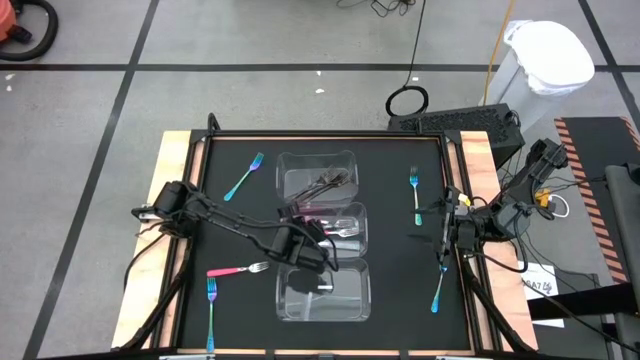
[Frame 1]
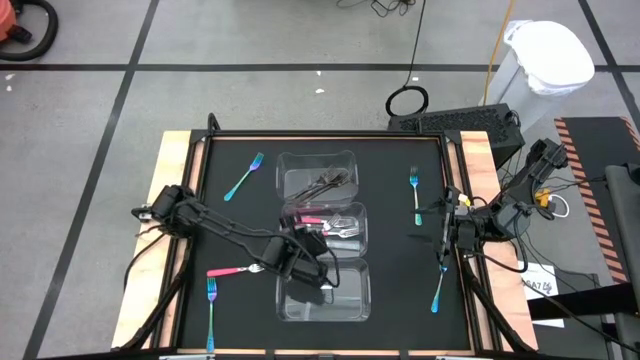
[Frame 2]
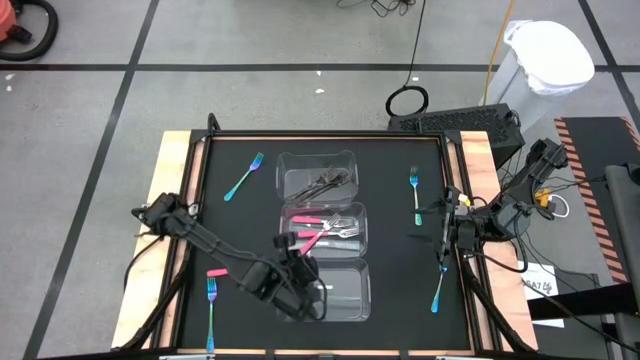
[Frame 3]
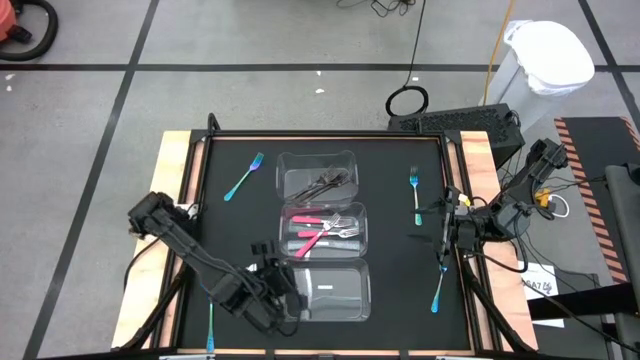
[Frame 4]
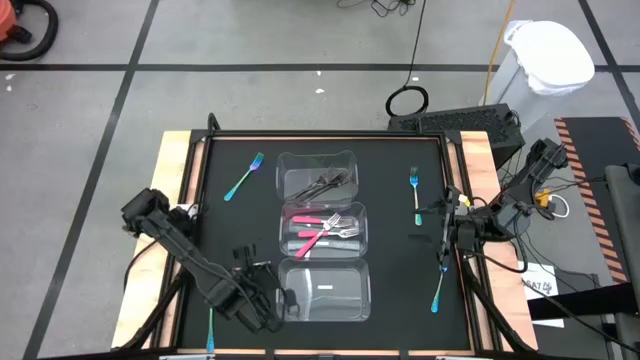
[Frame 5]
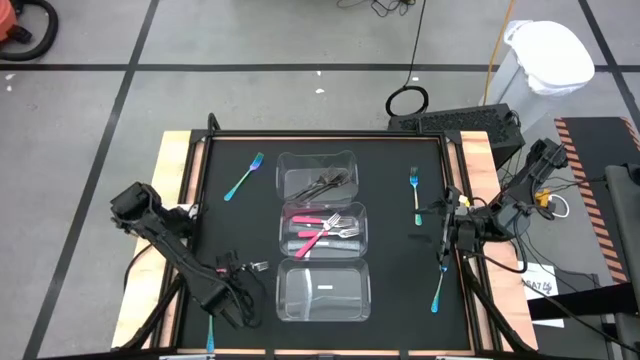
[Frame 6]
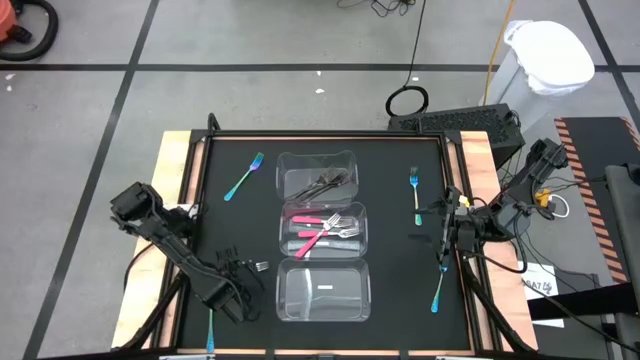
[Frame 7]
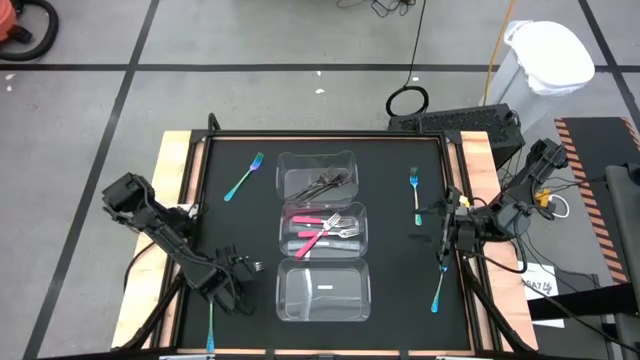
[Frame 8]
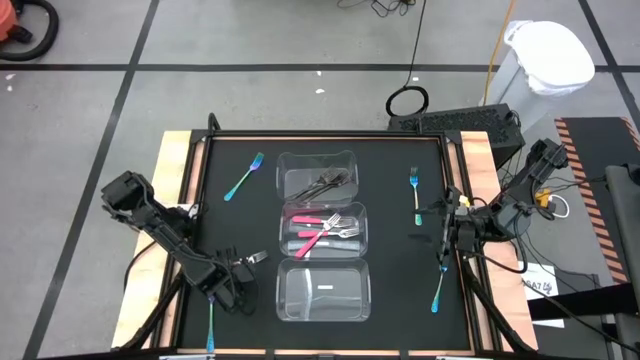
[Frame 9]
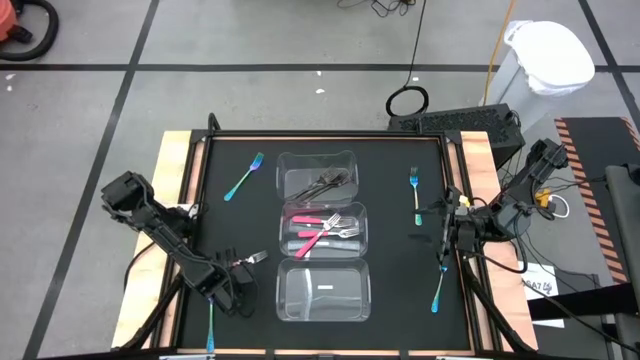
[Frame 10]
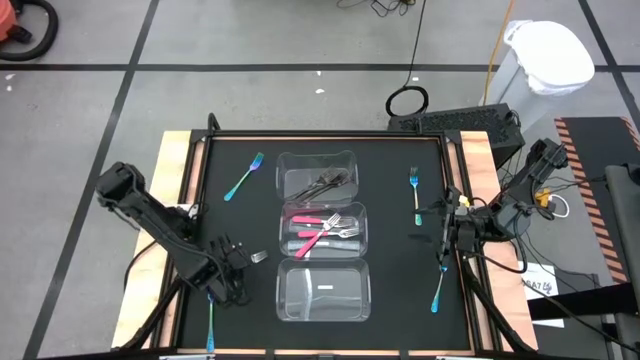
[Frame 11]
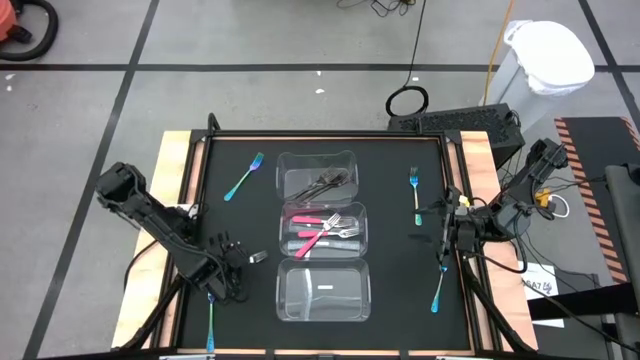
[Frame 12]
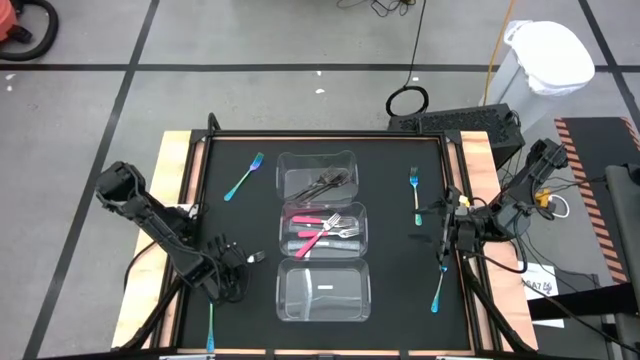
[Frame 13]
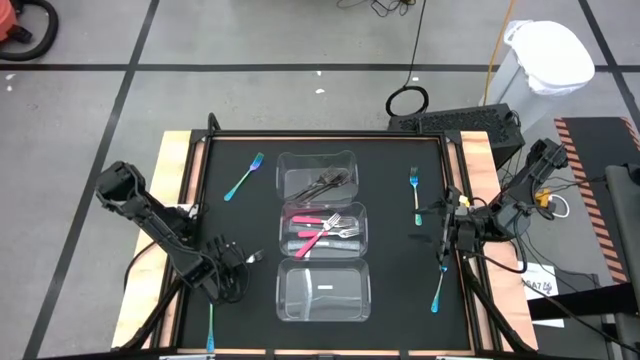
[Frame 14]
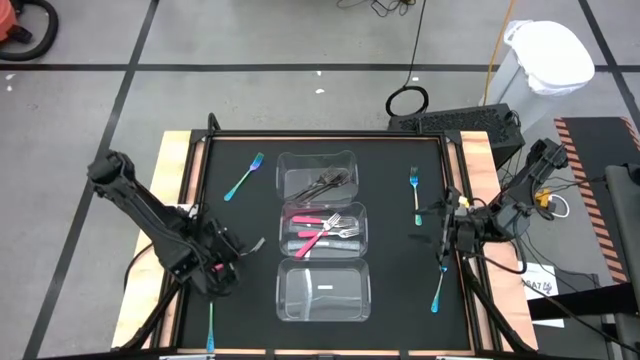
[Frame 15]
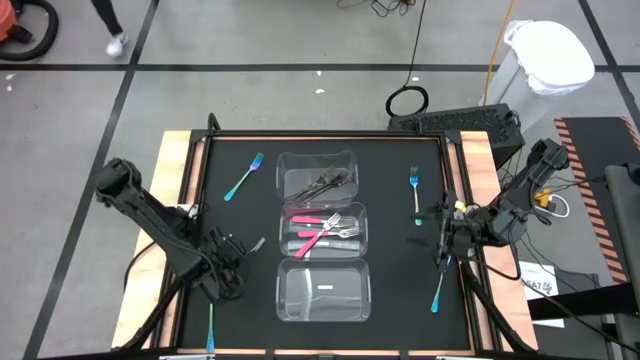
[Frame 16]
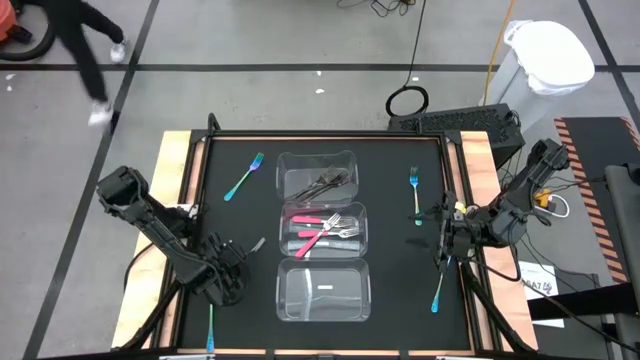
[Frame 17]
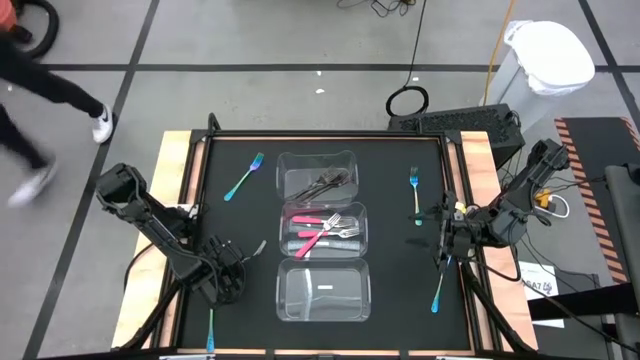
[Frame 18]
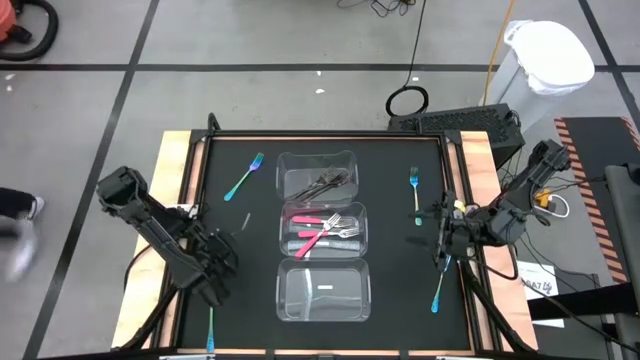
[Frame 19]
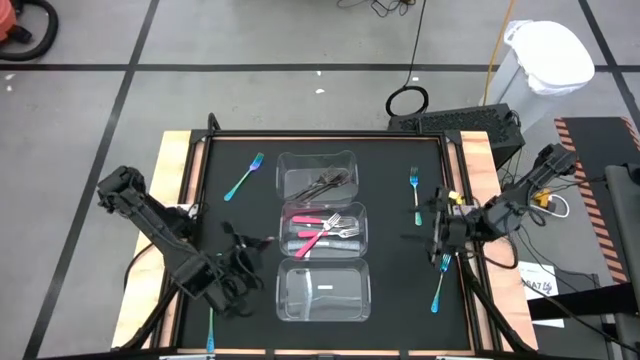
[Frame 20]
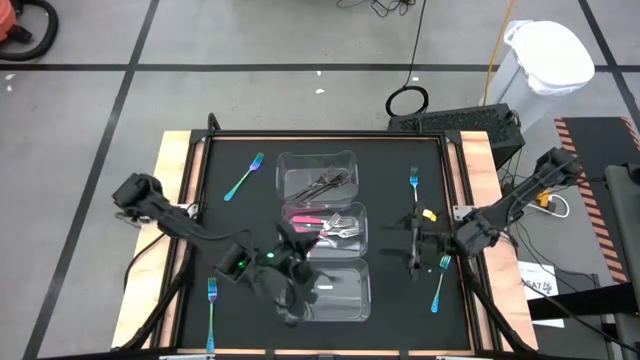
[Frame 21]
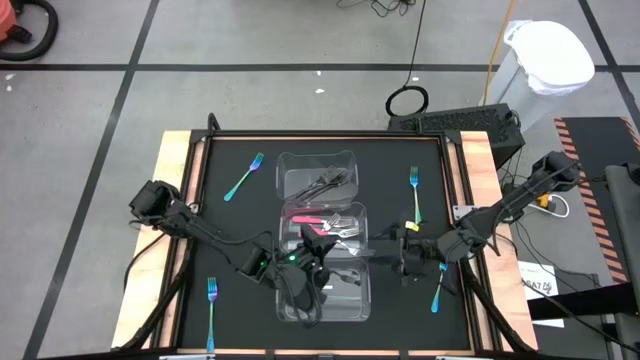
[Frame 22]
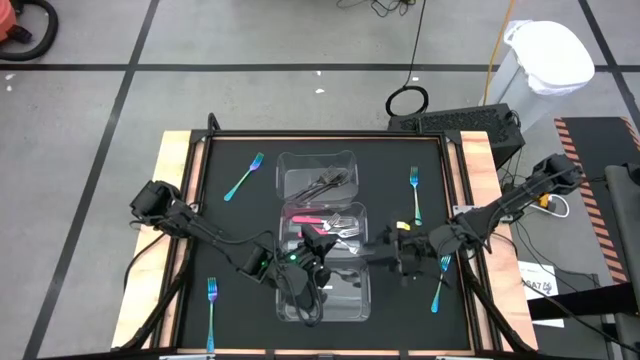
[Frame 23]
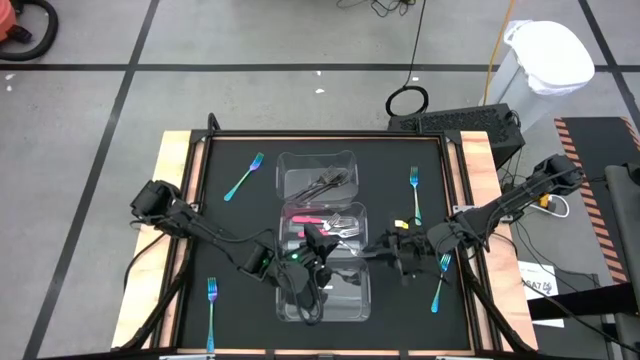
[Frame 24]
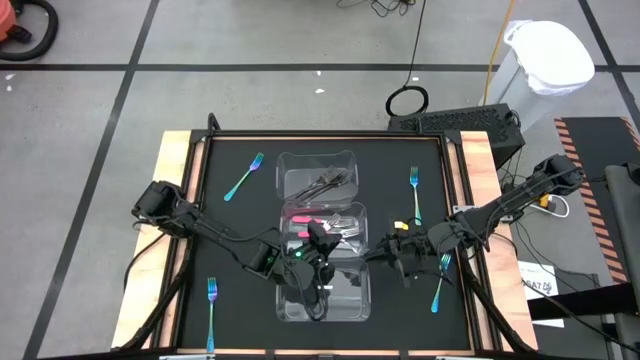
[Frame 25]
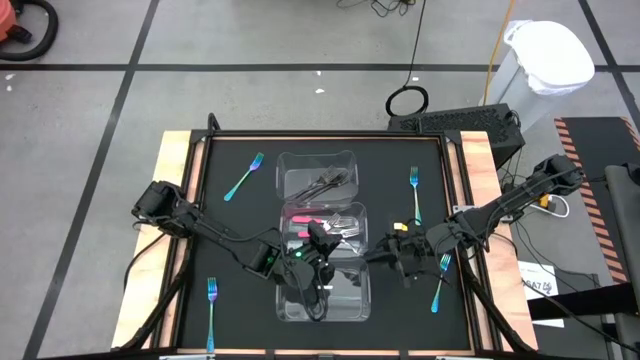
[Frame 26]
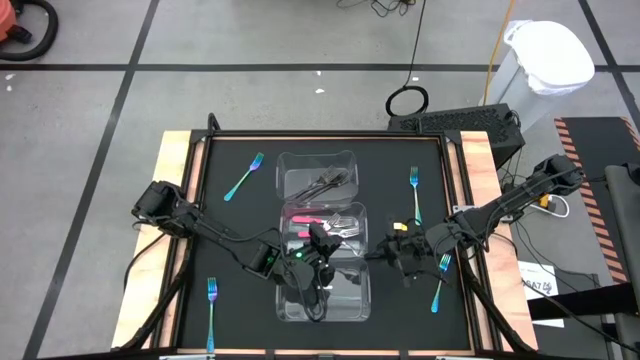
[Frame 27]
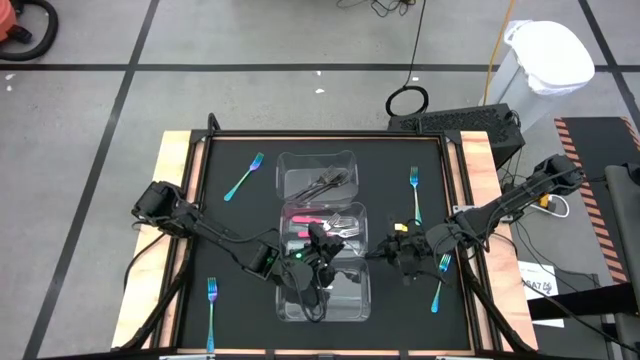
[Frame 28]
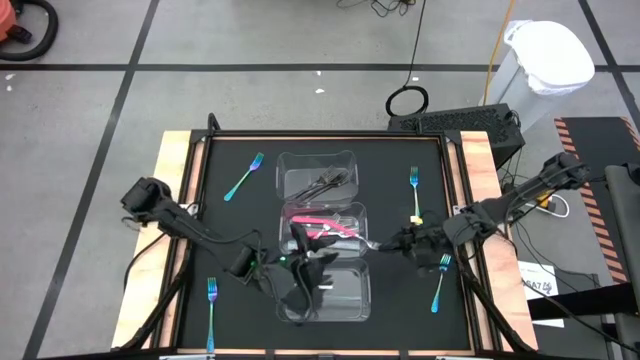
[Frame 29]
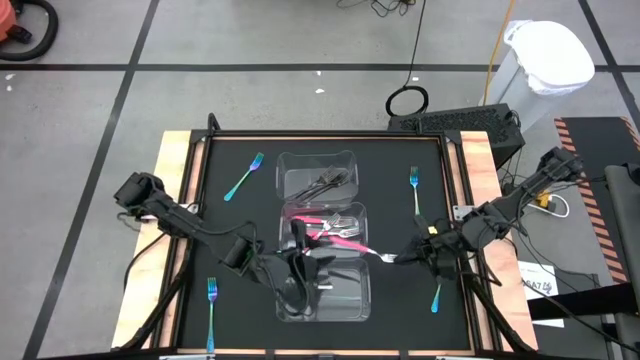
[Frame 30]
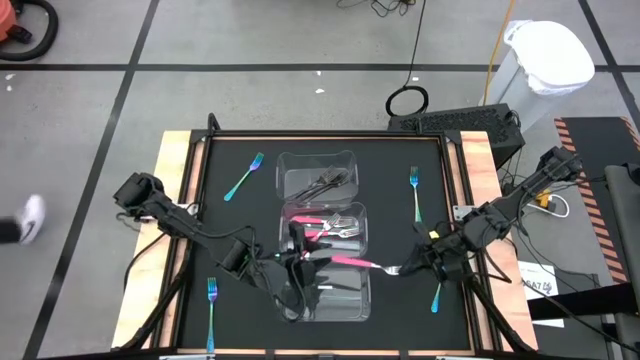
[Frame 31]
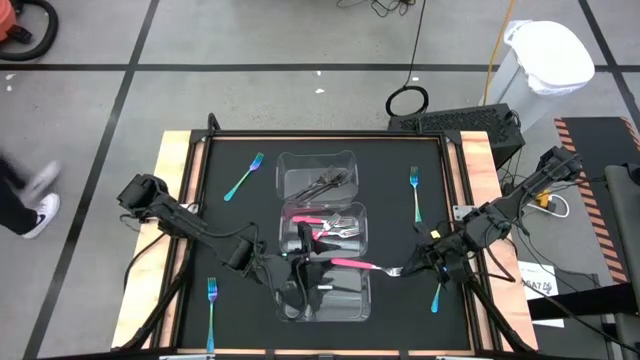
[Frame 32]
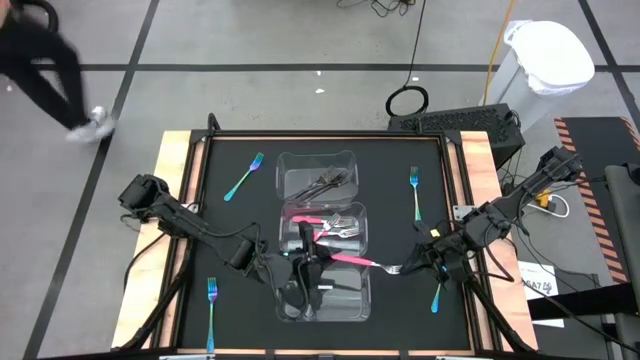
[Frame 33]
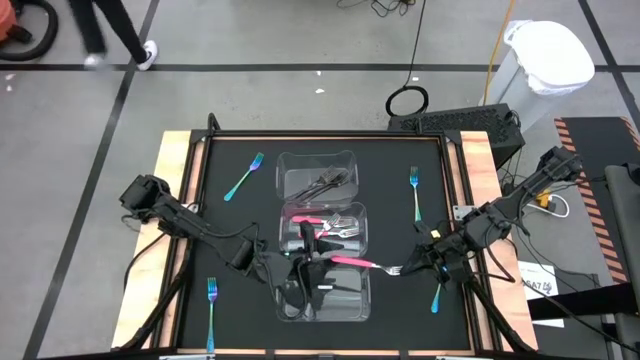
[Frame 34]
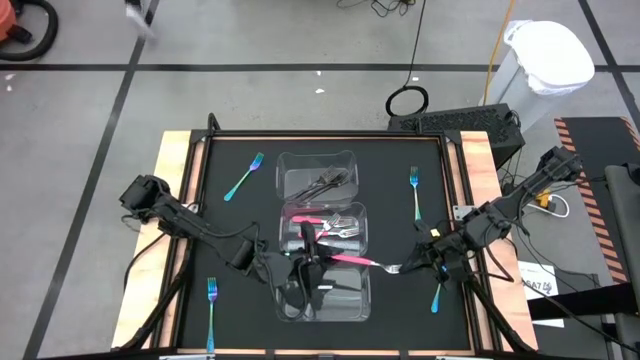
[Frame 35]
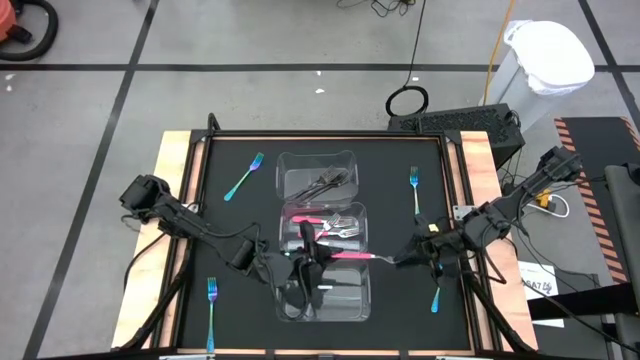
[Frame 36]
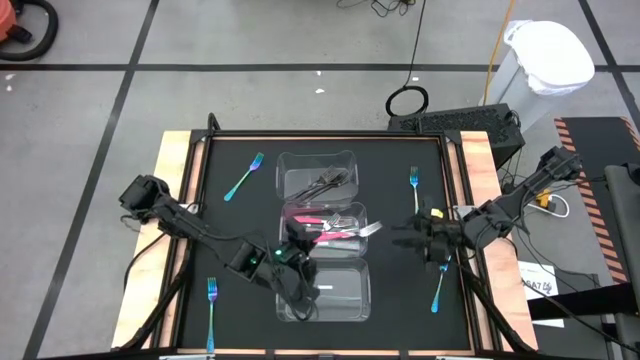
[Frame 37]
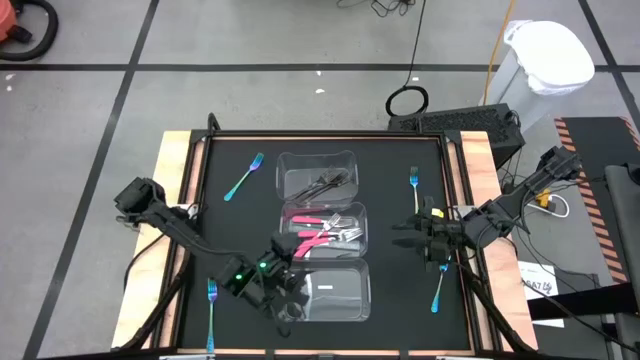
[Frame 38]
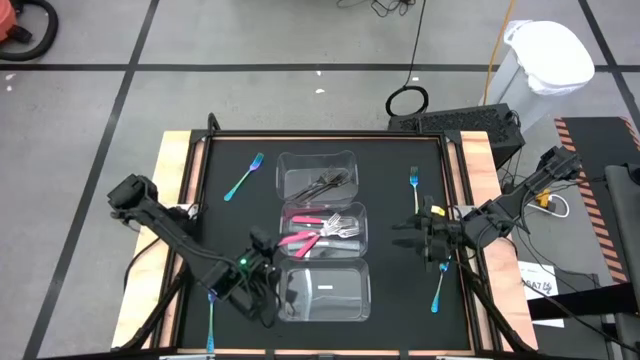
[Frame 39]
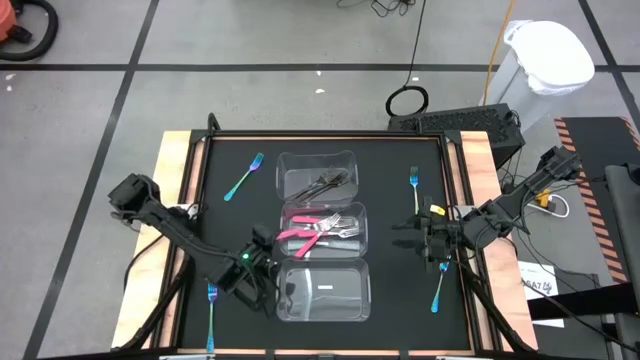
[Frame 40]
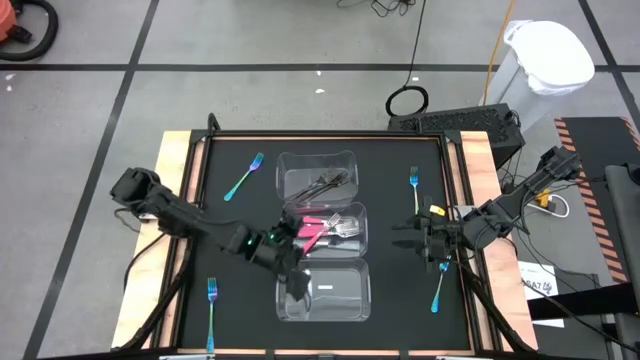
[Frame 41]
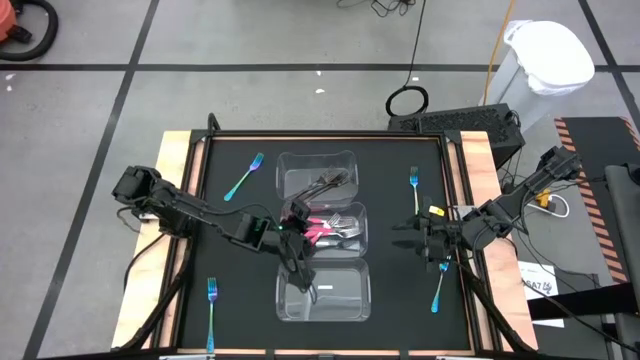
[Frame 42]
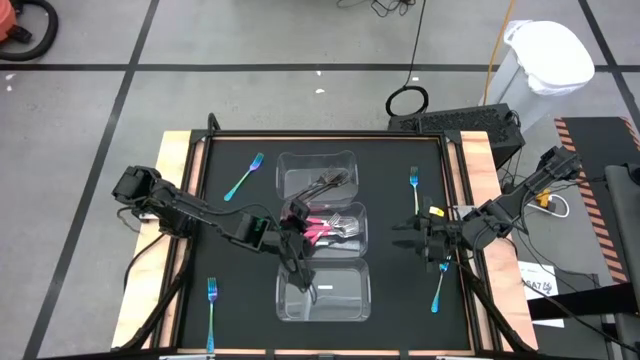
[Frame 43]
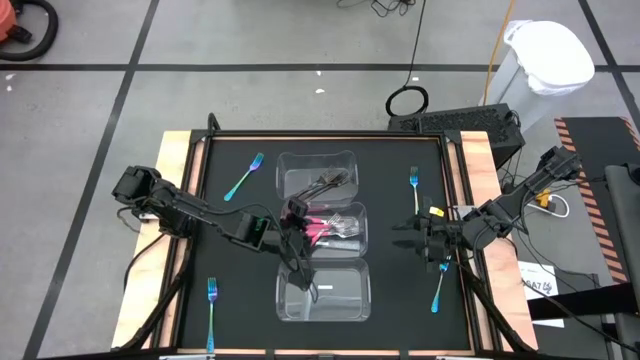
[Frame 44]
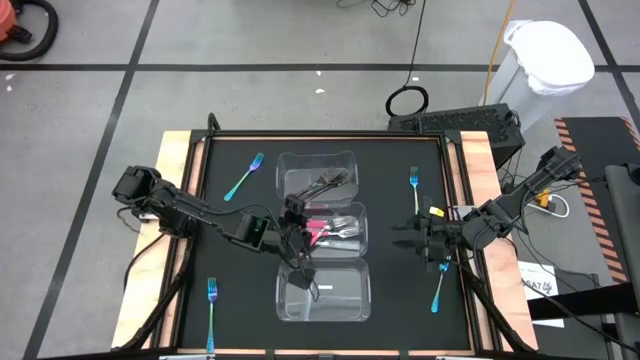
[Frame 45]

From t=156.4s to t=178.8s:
Task: Sort silverware by color (type)
Put the pink fork into the middle transparent bin
